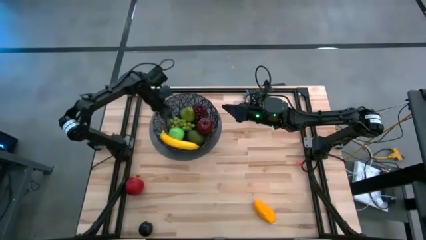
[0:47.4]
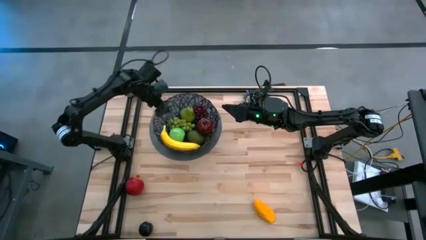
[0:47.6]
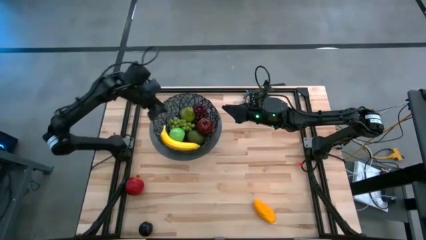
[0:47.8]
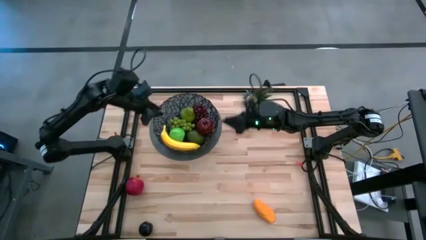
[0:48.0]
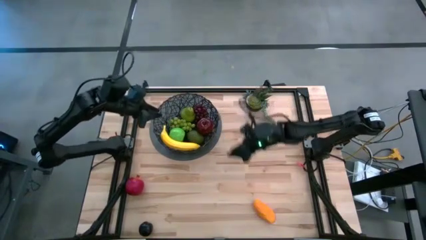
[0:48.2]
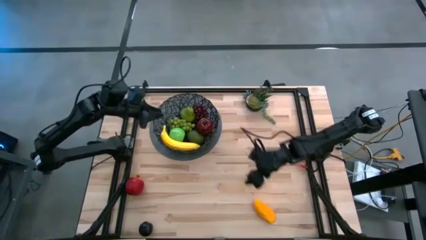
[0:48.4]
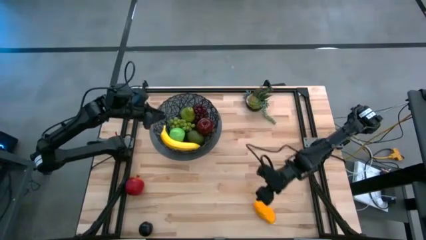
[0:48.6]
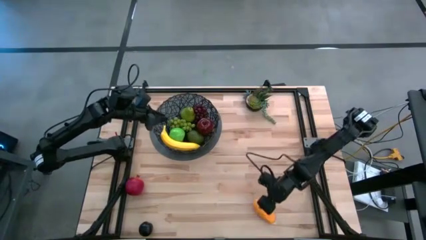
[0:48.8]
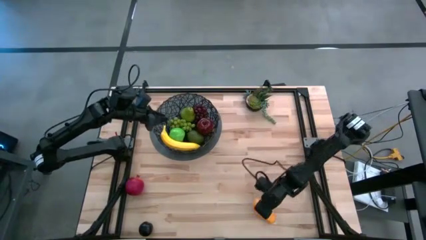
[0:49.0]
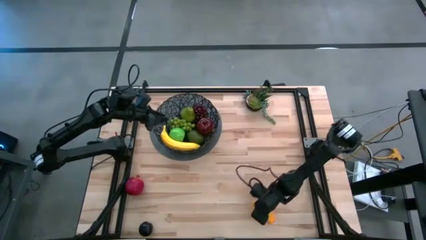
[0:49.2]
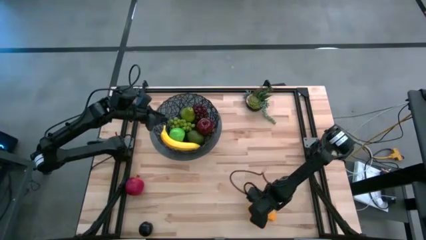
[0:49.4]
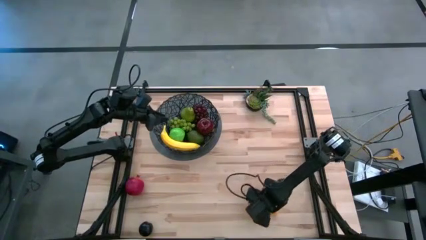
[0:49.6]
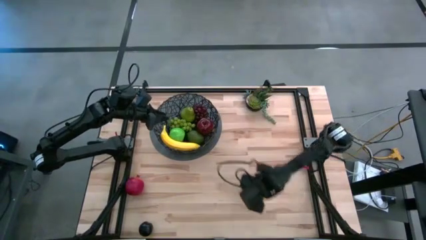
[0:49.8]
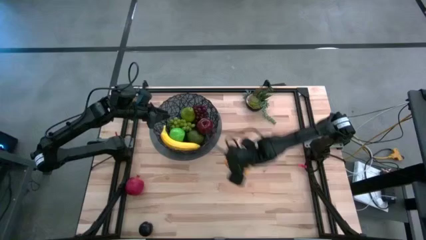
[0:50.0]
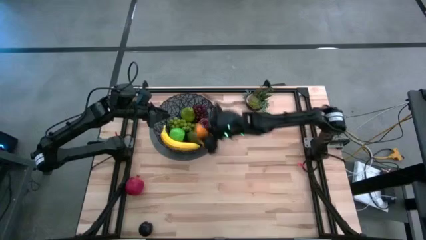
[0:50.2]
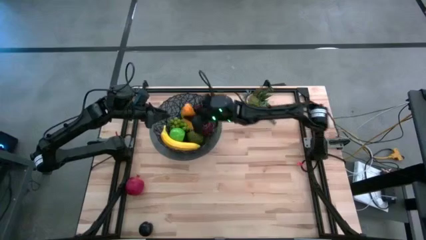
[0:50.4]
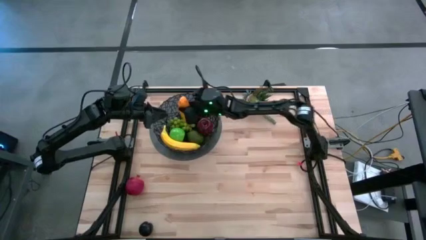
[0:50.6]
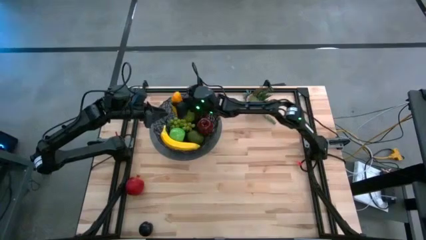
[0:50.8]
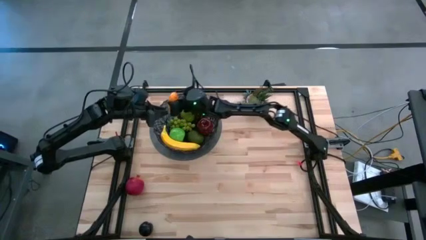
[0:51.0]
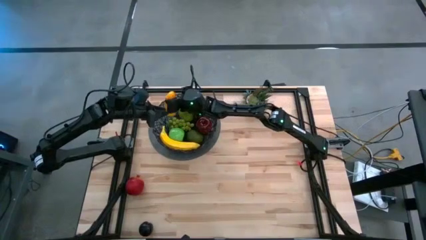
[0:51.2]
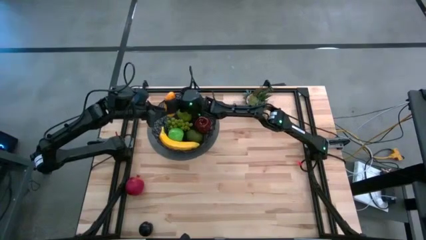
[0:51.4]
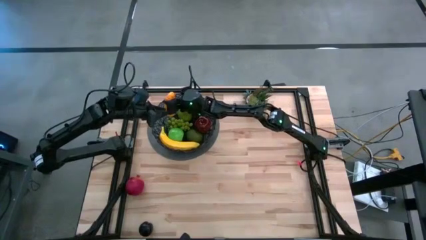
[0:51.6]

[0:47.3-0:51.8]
Task: Build produce basket
Put the yellow mango into the black wire basket

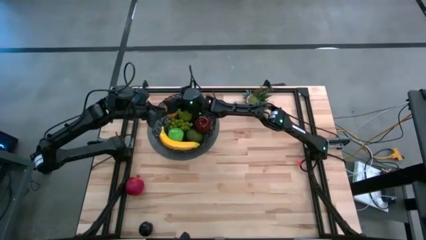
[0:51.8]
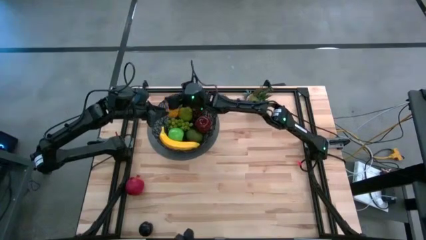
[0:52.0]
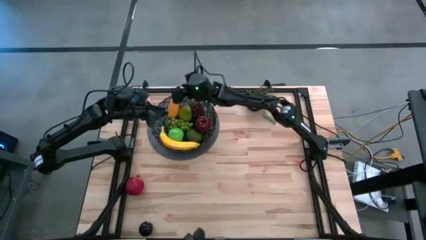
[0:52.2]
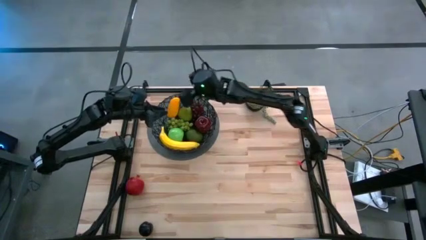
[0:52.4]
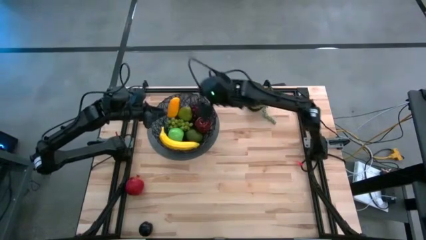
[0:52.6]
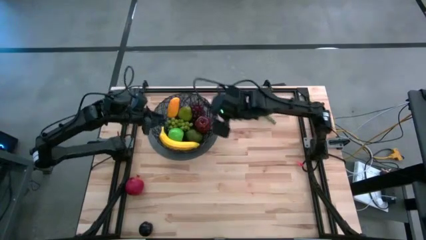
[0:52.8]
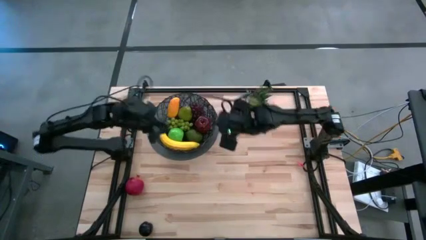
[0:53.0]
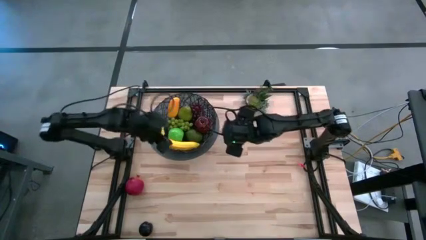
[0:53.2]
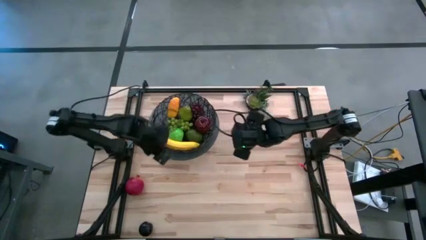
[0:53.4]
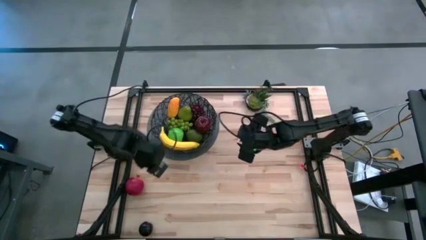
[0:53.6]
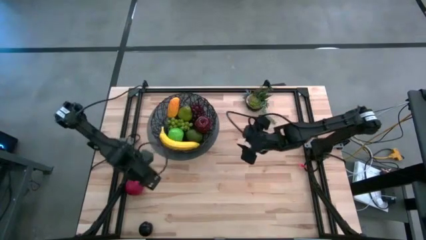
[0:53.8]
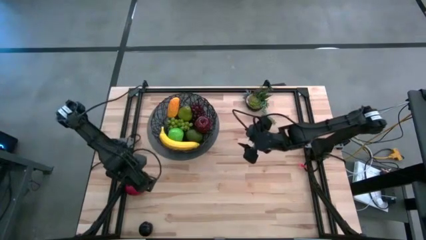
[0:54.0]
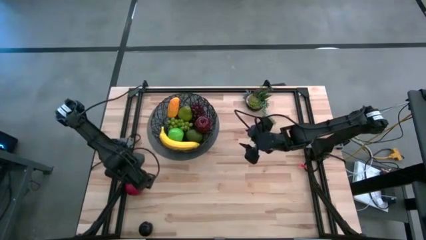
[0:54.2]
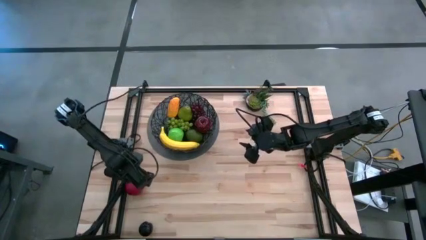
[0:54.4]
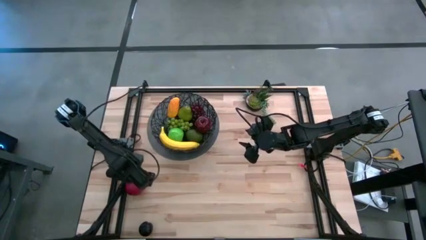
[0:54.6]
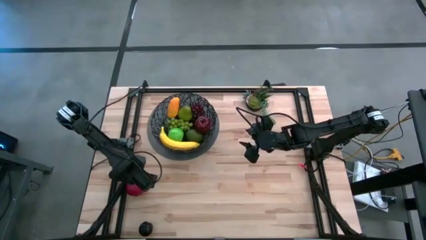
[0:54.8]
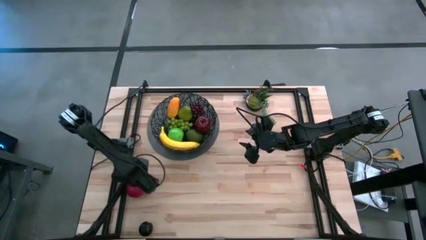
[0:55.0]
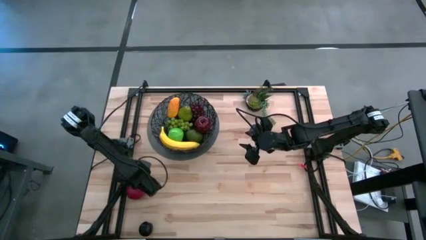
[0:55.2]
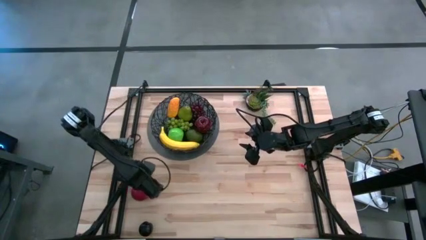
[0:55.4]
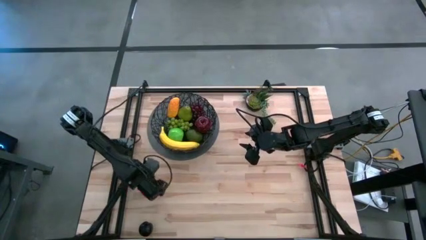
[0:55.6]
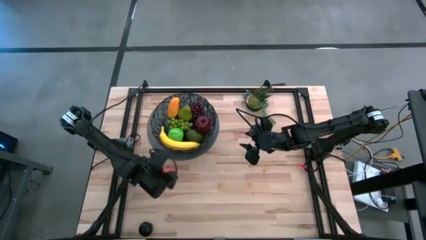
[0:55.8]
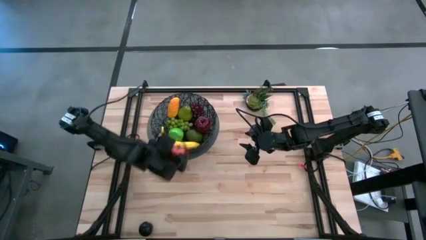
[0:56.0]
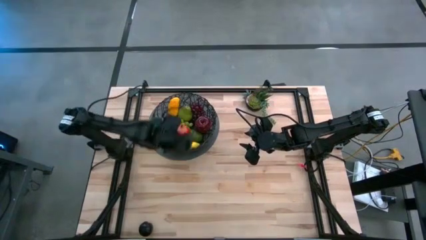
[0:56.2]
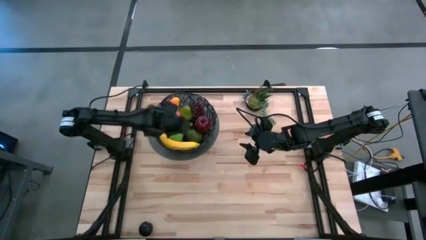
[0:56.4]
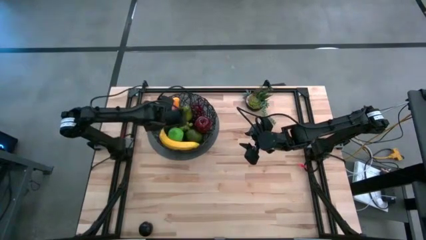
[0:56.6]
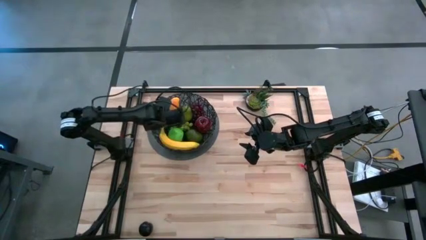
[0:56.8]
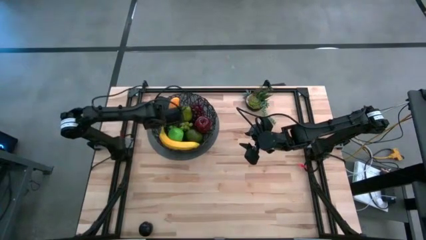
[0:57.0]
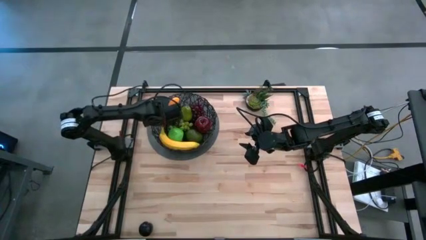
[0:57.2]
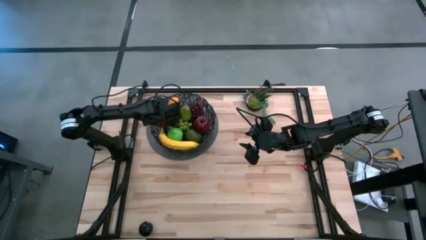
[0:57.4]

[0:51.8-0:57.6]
Put the red pomegranate into the black wire basket

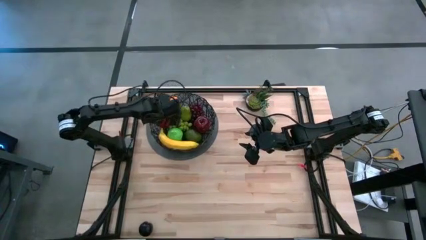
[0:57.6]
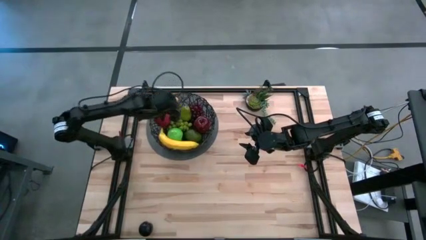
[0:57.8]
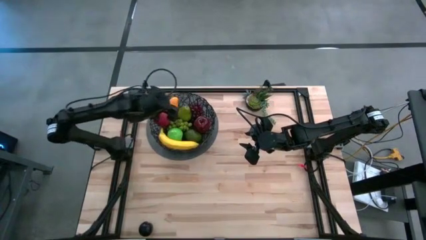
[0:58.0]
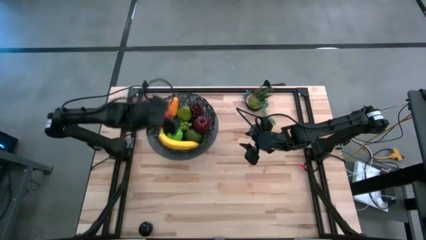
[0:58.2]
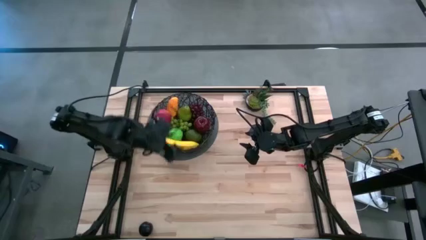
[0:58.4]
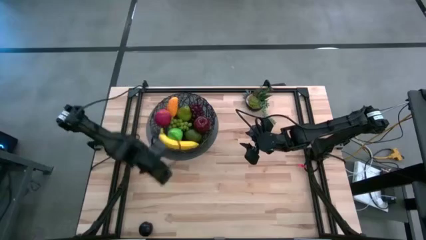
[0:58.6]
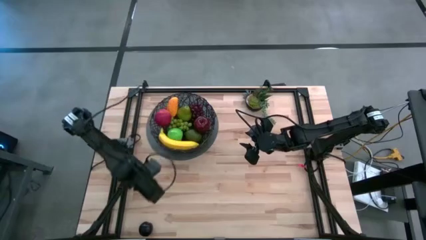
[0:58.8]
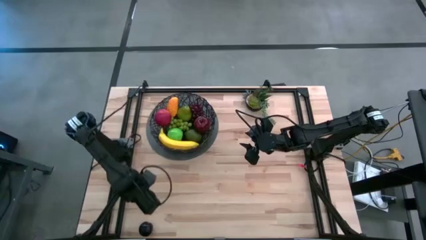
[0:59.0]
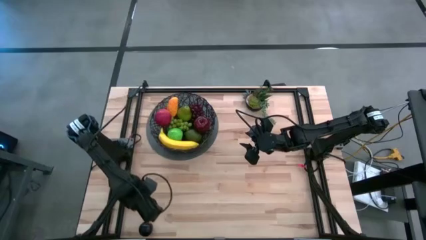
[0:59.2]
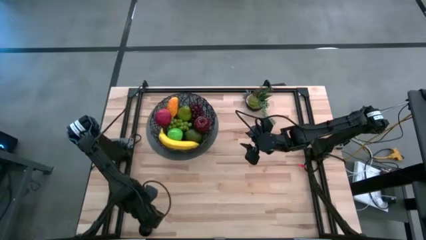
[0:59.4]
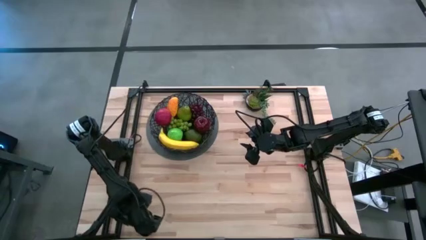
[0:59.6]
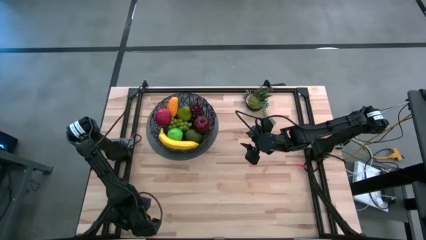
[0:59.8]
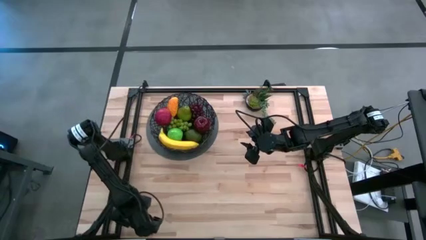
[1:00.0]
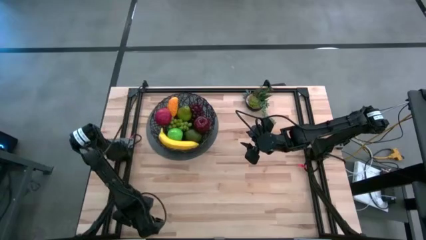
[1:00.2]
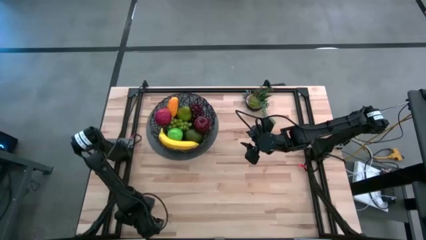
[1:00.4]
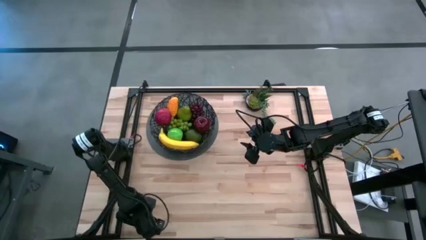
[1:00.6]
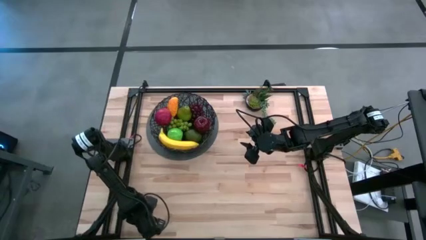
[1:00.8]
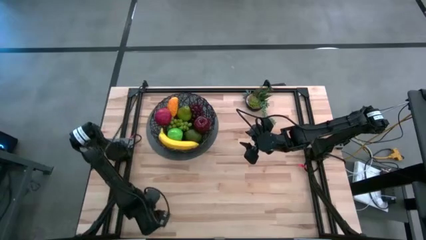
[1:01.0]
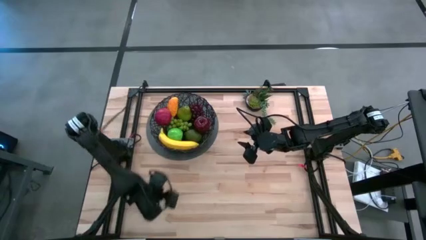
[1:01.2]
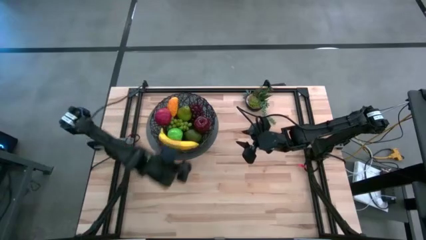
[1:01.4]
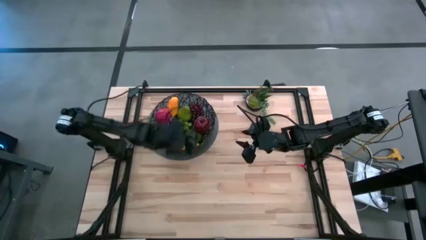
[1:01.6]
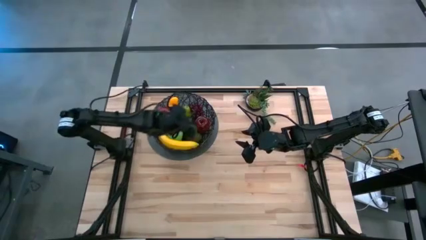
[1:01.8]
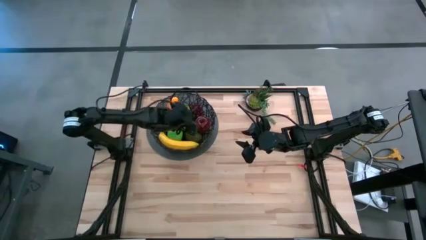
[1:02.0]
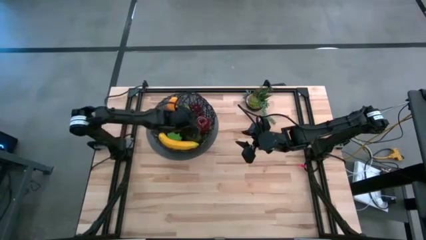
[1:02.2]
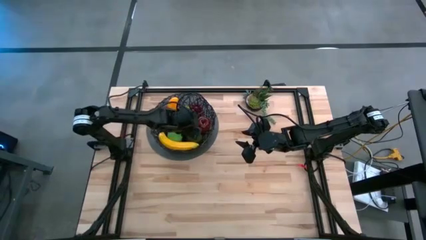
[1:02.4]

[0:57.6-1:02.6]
Put the black plum into the black wire basket

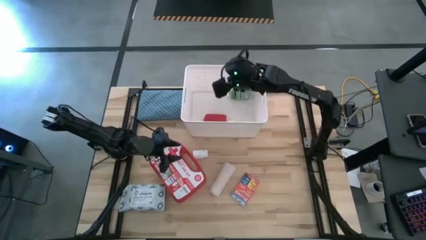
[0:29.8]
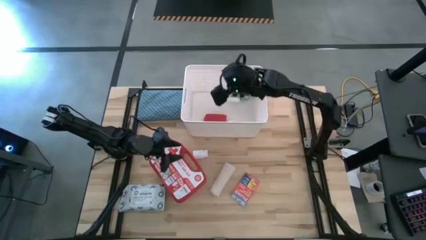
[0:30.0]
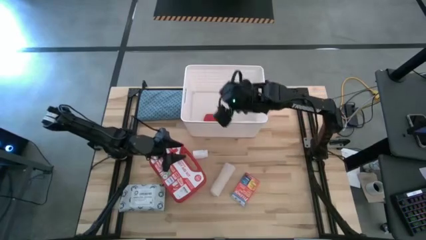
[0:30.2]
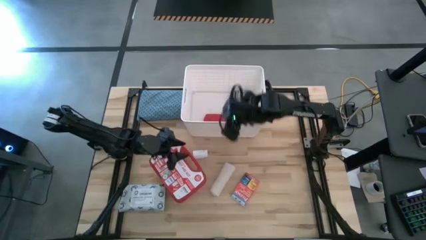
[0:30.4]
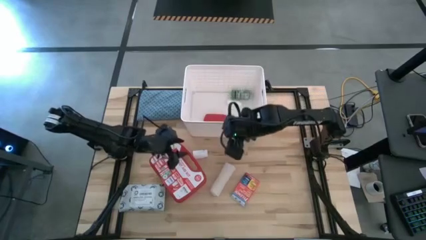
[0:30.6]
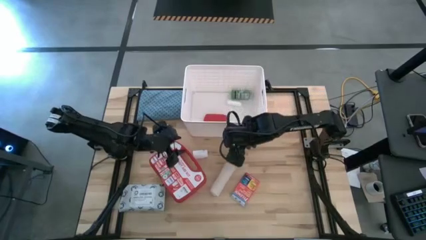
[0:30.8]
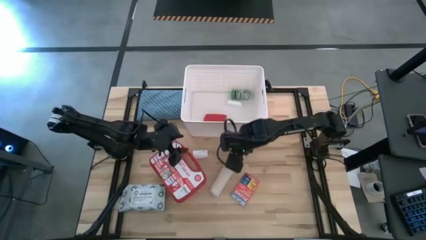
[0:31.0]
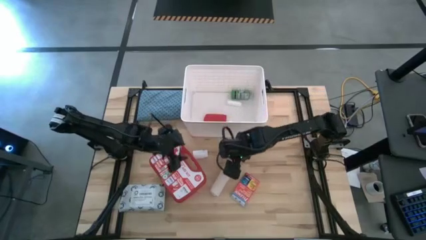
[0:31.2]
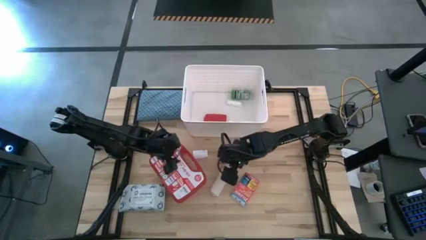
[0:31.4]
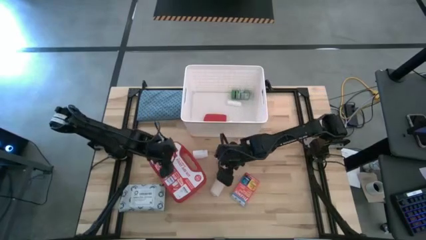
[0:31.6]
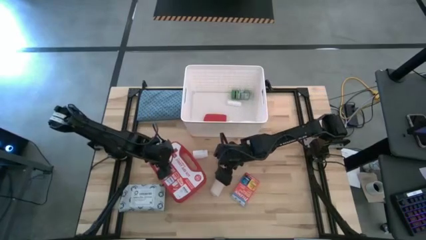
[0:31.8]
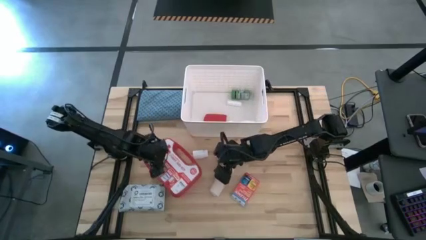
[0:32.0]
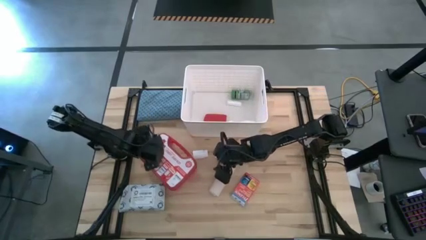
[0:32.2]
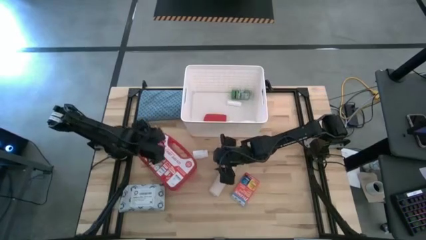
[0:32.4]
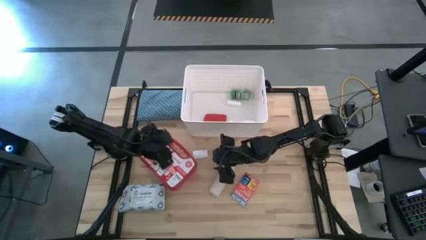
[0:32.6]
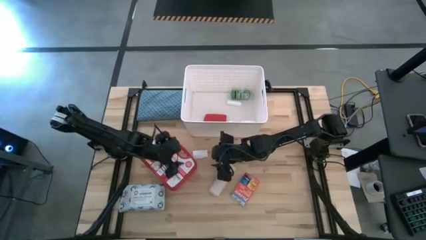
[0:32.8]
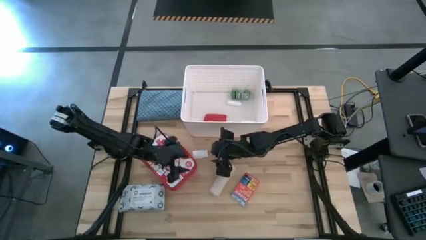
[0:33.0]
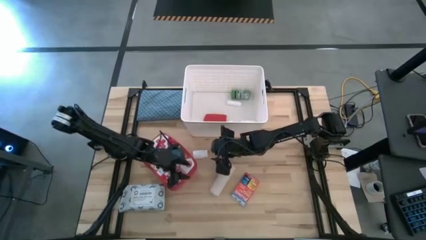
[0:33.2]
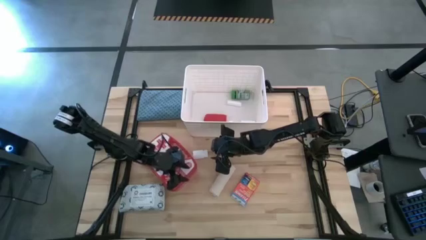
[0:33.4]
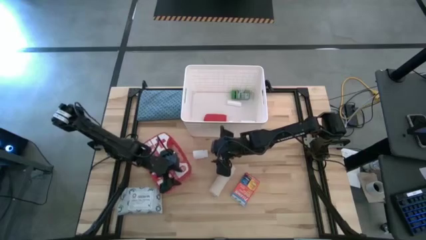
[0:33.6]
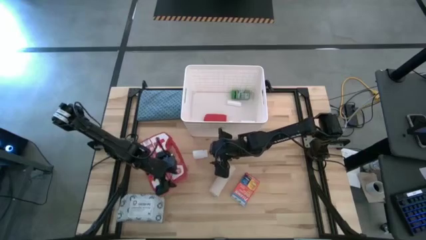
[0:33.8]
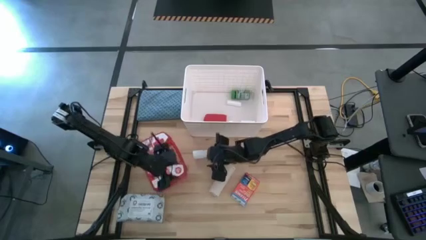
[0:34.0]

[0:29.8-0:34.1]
Task: Pick & place medical supplies in basket/bin
Adjust the red medical kit
